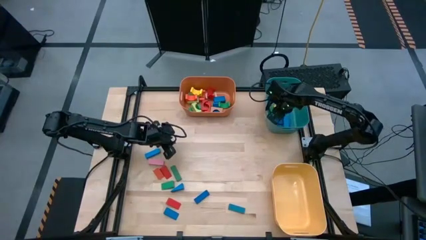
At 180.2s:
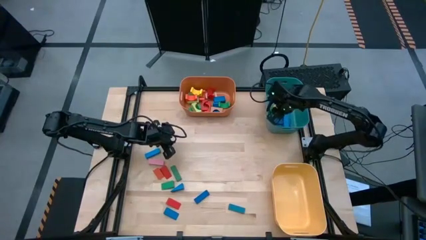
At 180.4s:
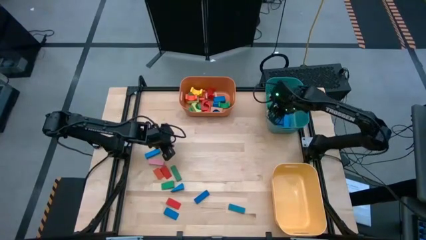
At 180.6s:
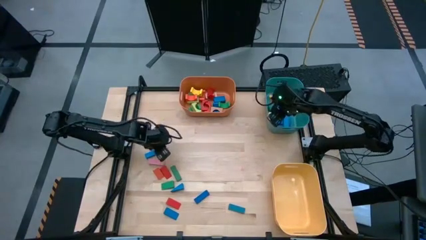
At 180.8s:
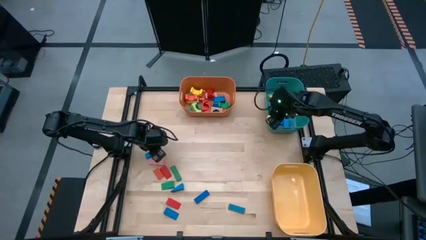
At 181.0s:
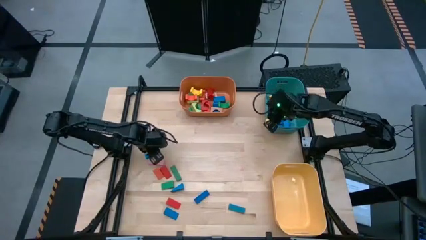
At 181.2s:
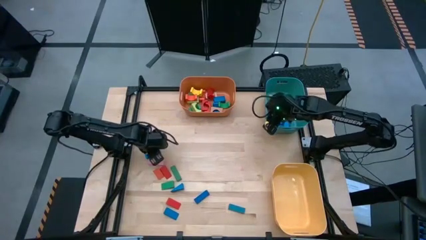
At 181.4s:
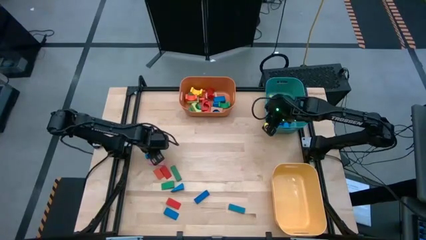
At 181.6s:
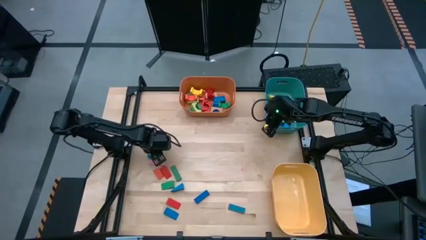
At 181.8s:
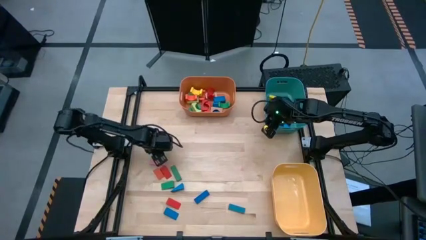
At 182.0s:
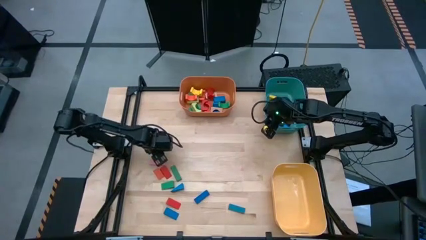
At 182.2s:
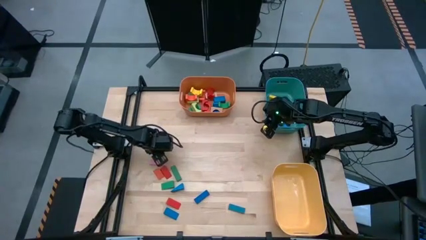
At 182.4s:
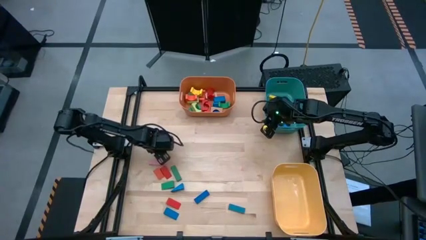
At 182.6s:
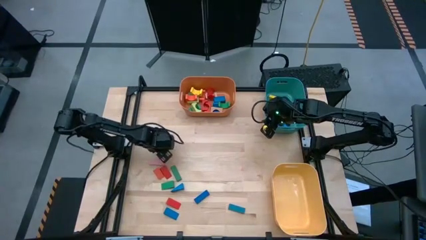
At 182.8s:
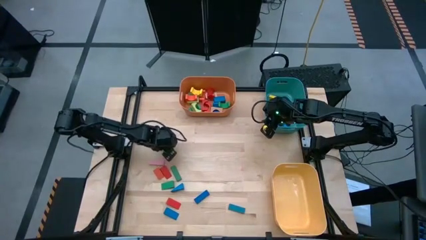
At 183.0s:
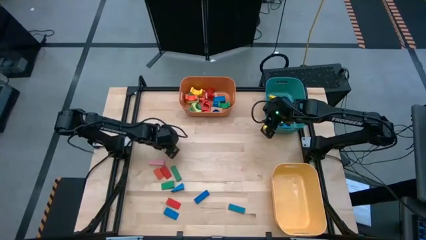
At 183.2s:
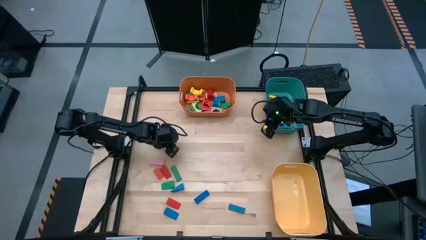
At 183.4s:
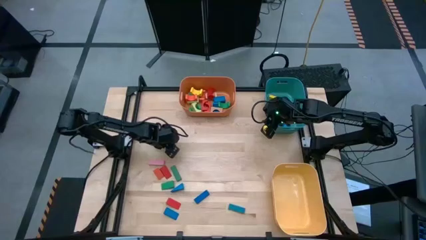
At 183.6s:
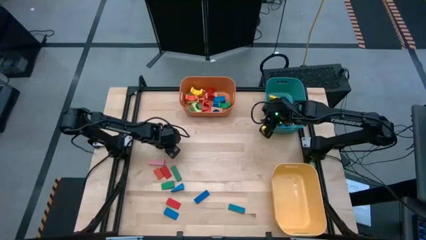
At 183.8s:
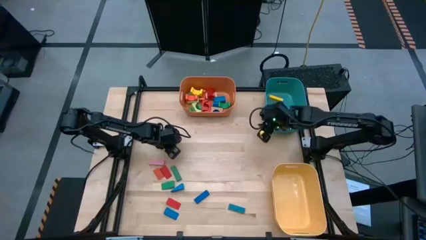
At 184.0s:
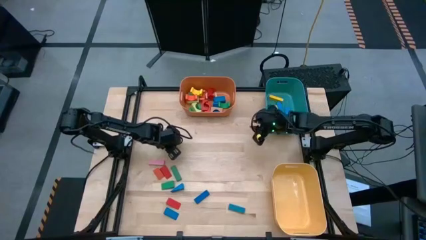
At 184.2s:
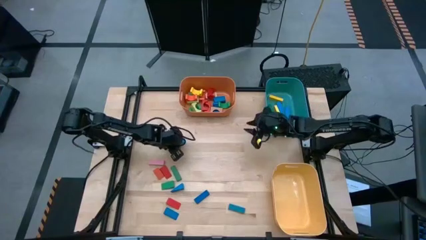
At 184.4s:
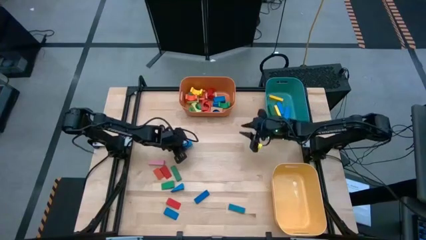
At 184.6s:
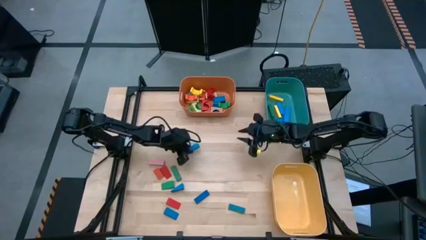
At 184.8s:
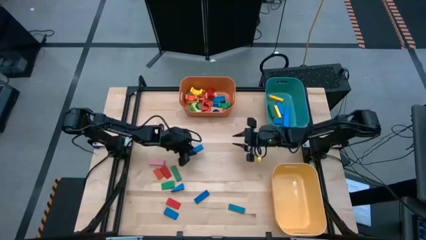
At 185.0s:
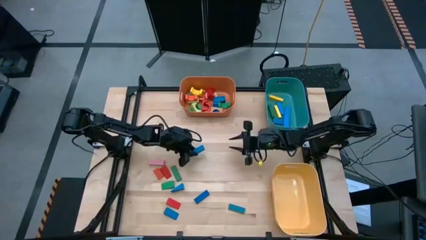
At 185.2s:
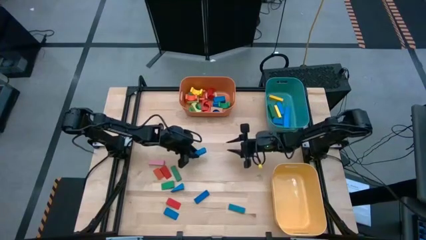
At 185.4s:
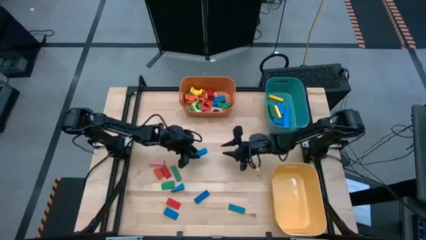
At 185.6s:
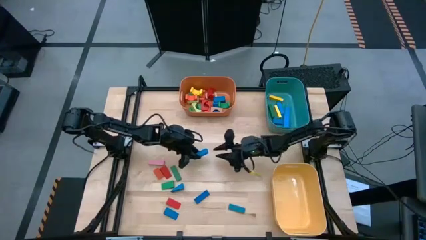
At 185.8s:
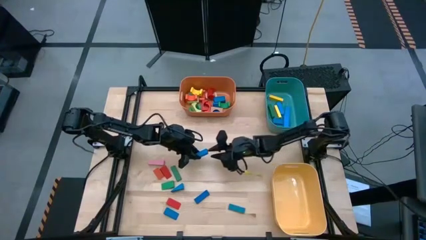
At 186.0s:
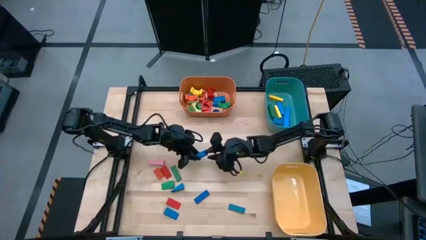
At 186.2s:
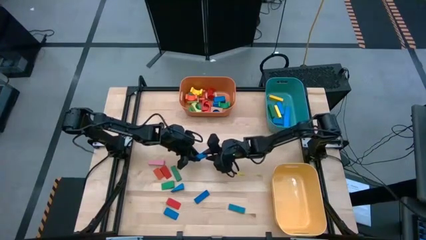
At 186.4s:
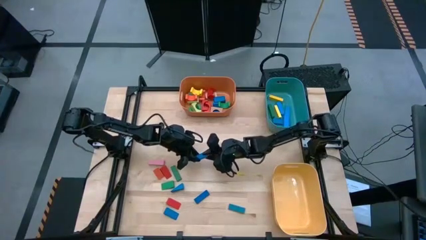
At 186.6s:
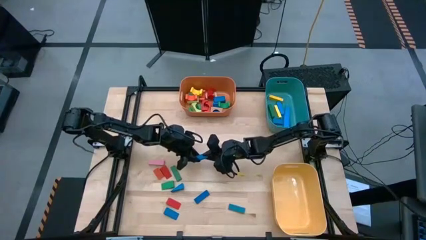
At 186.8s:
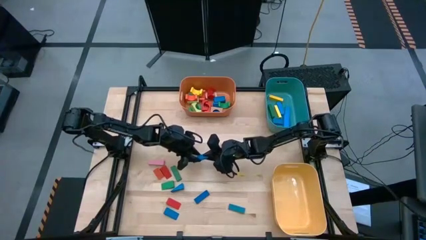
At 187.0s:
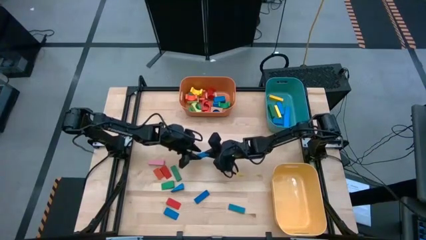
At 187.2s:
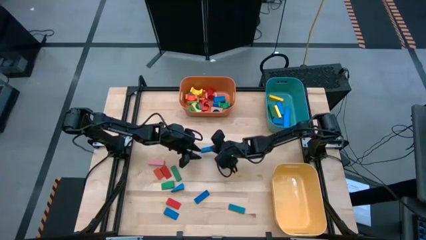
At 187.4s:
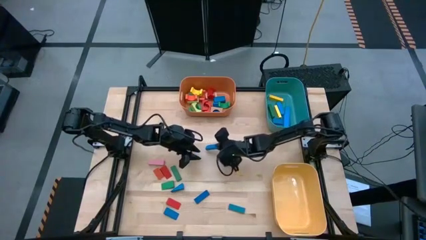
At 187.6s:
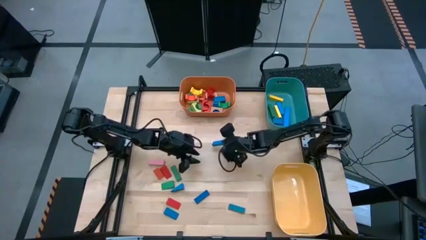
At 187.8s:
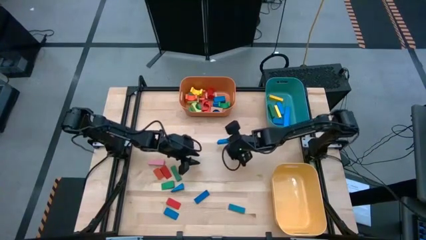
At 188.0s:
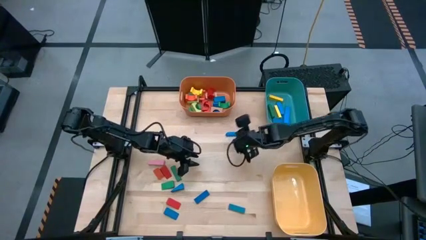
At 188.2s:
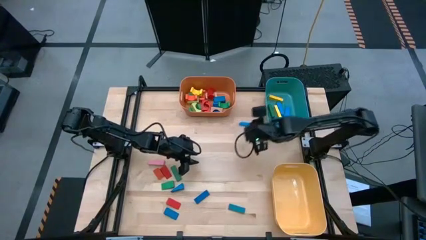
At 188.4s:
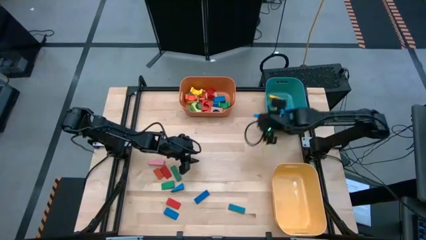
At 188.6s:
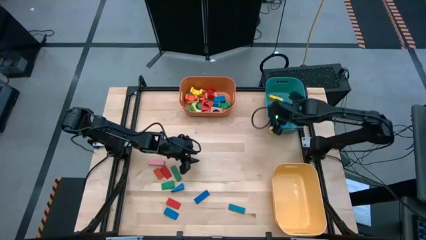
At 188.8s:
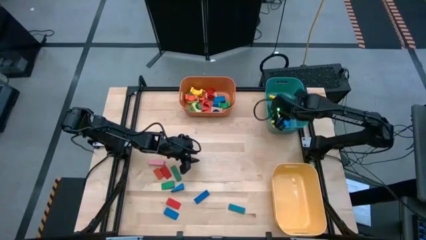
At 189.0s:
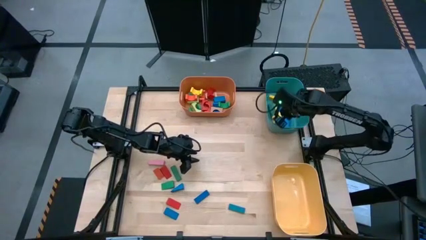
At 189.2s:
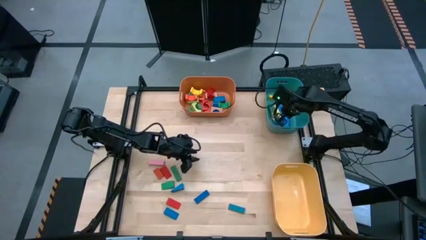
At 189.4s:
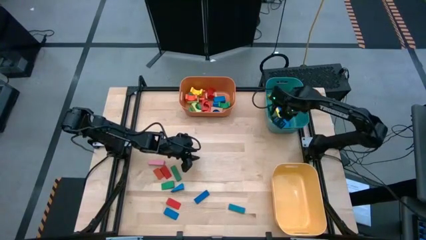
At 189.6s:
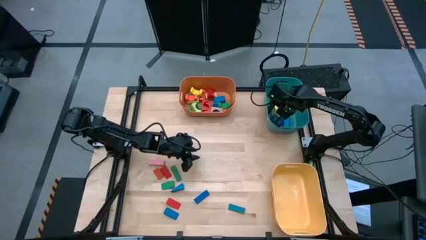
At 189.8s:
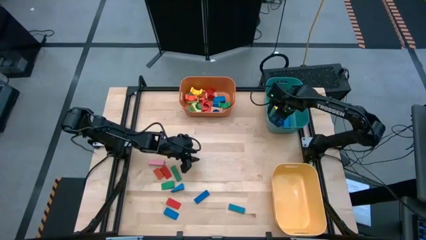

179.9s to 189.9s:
Task: Sort blocks by size
Put the blue rectangular block into the green bin

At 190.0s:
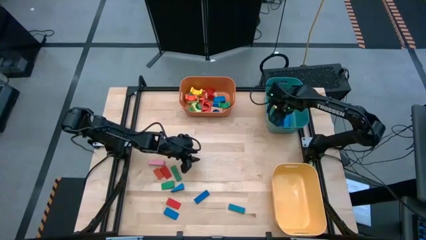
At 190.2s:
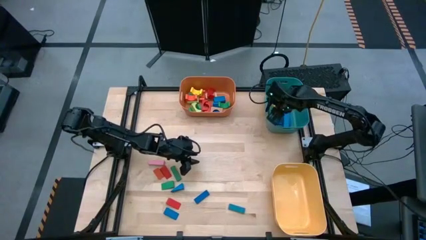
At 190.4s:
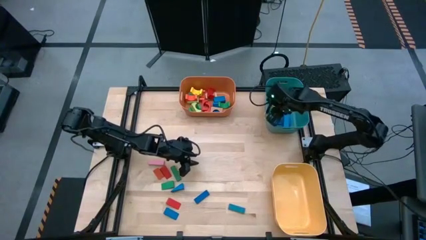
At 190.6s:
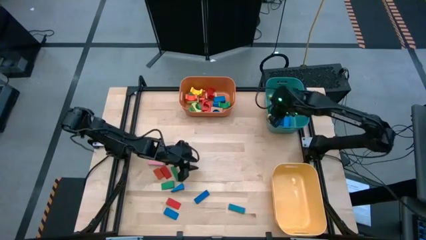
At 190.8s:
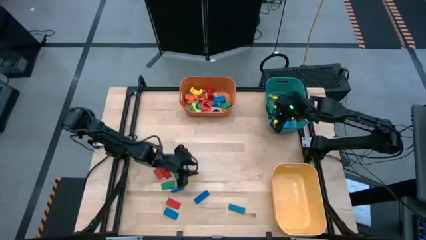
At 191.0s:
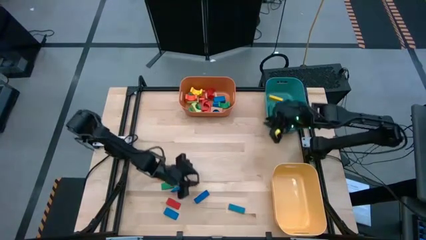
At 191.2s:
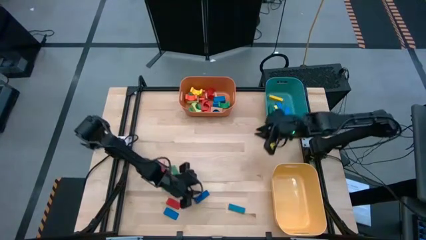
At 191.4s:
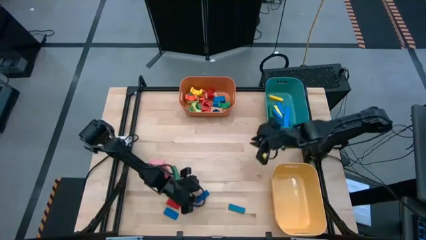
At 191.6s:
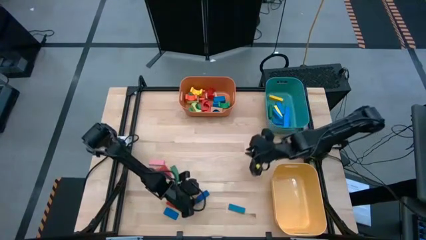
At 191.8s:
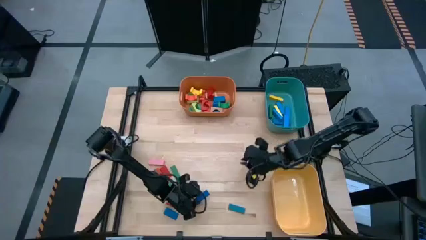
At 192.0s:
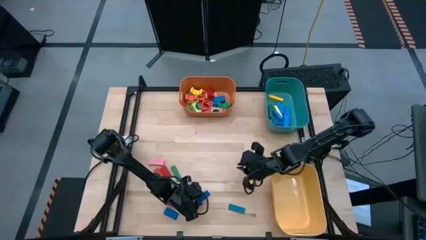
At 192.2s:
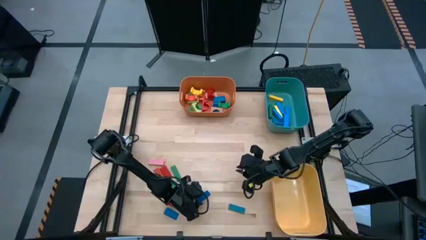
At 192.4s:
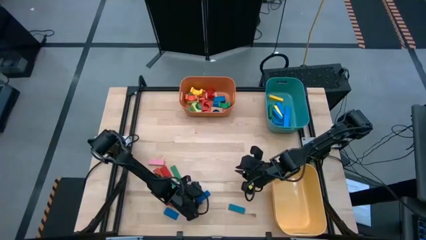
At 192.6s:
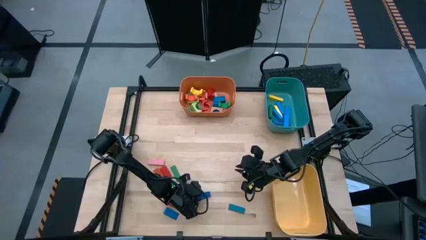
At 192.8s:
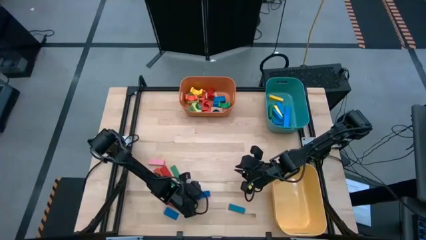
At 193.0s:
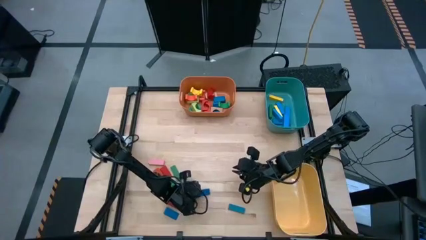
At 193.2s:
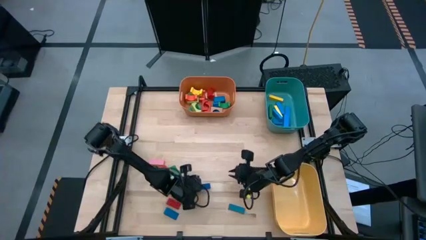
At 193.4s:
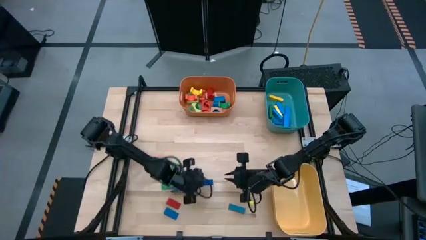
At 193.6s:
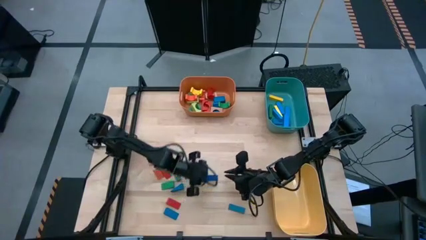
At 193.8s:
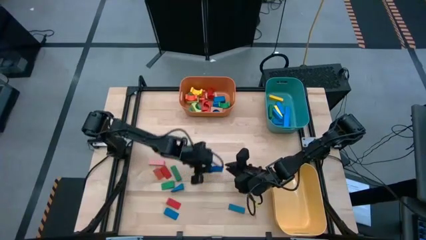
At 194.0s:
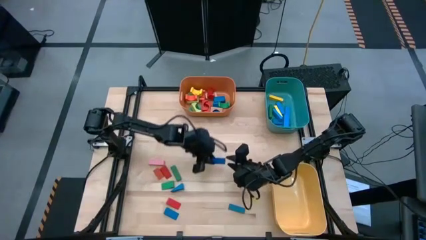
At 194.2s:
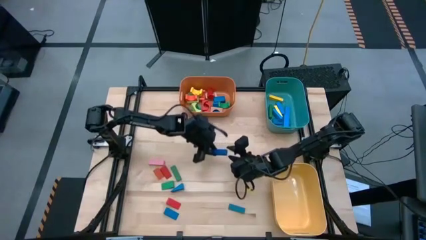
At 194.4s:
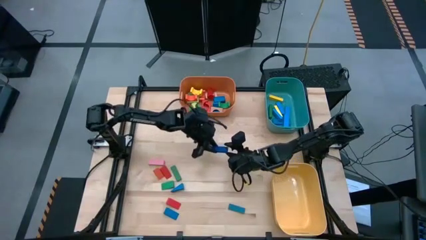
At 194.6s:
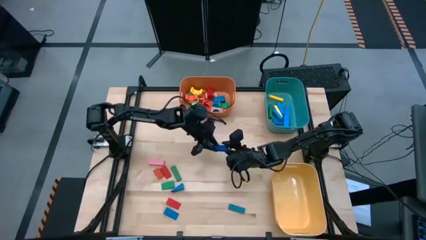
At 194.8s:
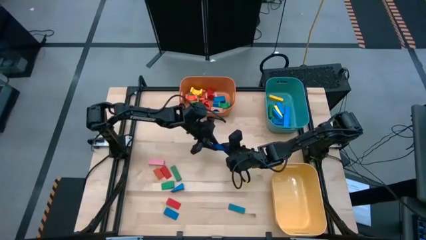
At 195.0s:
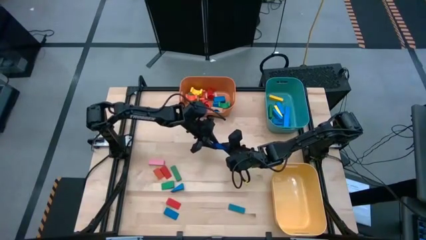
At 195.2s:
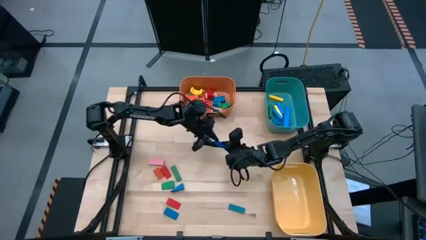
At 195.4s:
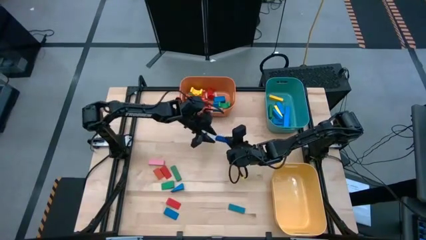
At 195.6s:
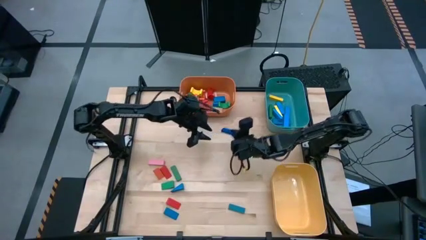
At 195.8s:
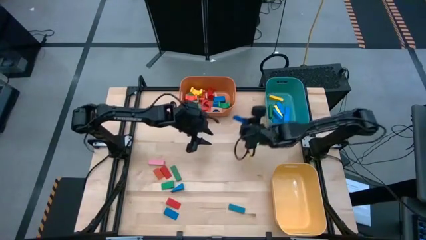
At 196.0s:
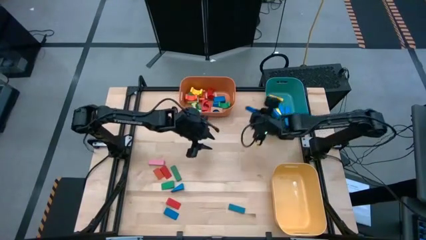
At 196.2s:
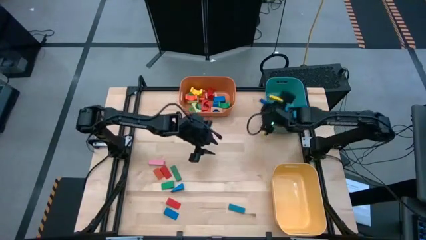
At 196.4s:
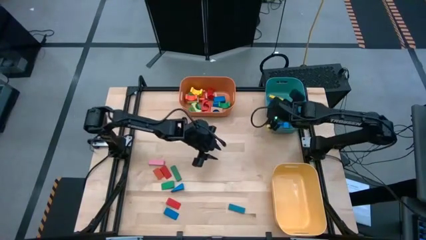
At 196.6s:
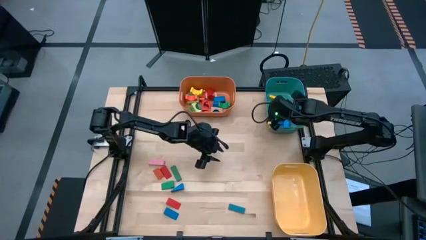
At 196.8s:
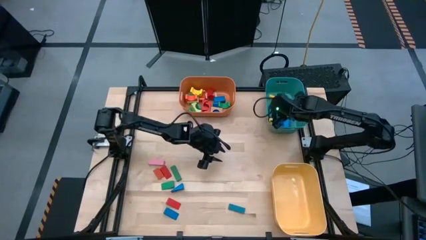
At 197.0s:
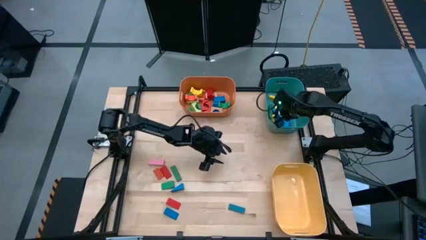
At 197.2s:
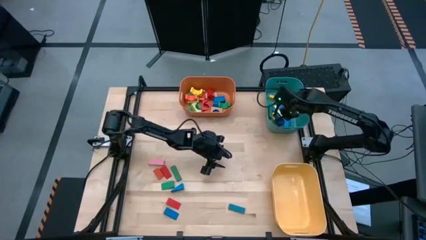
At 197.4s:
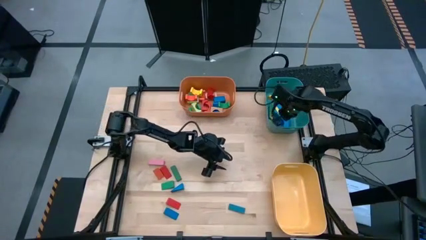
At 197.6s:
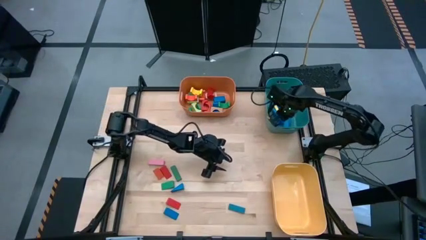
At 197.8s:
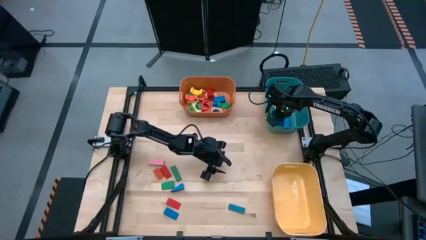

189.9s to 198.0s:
Put the blue rectangular block into the green bin
